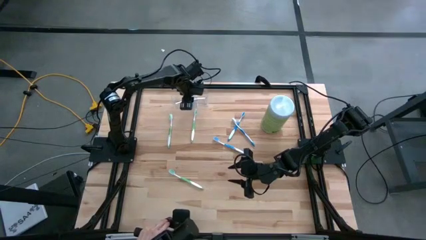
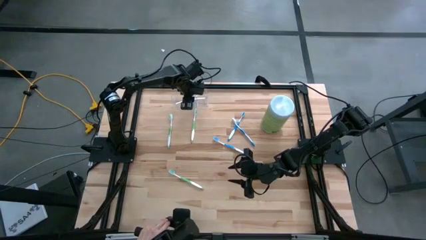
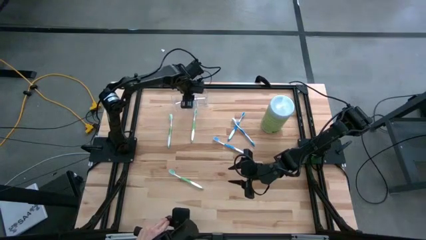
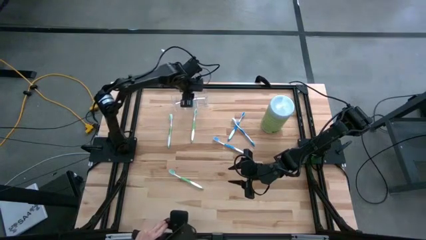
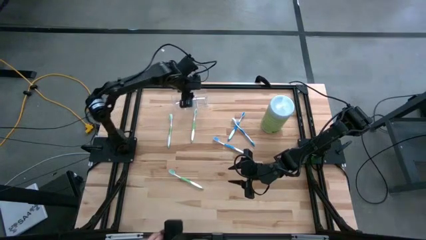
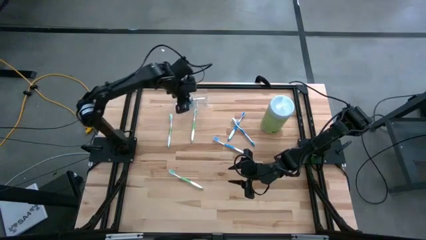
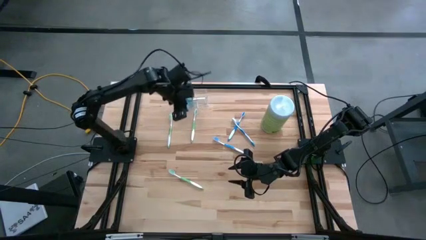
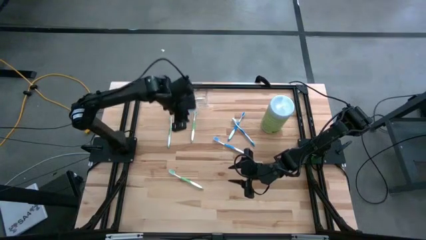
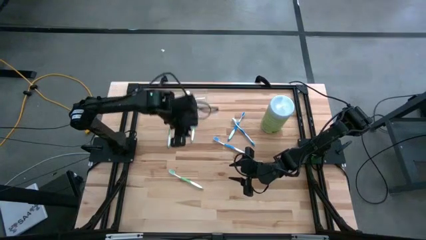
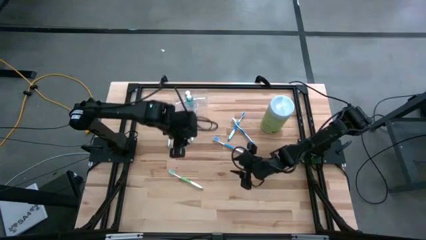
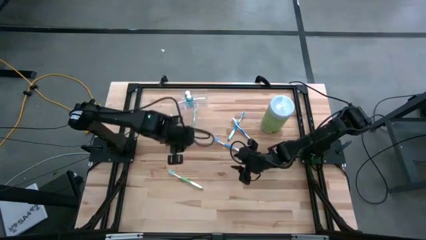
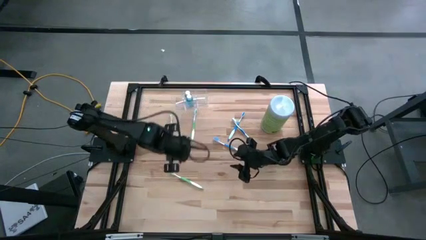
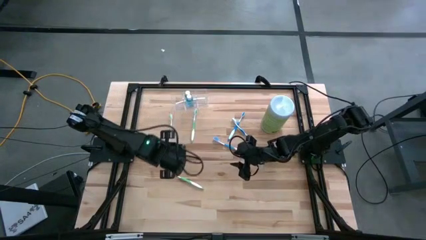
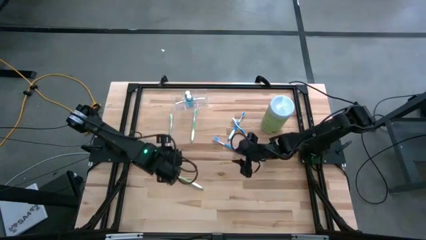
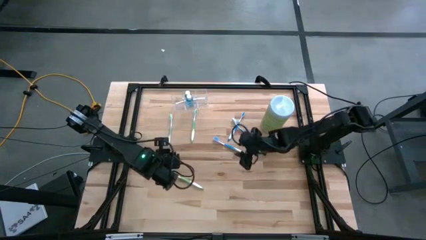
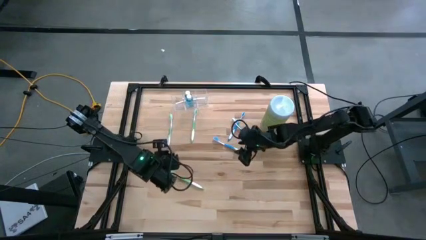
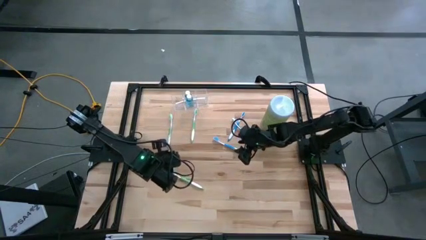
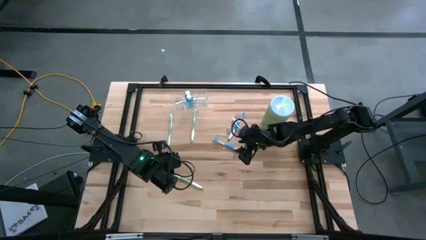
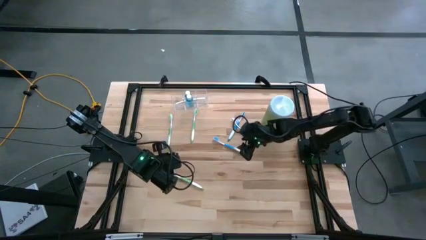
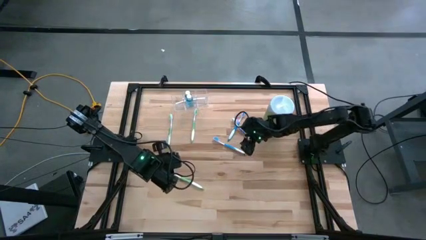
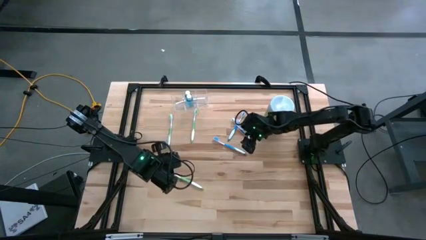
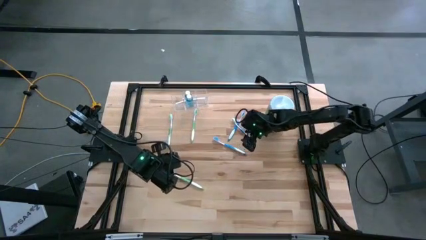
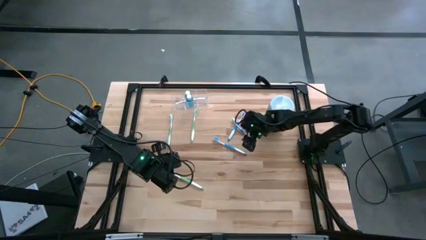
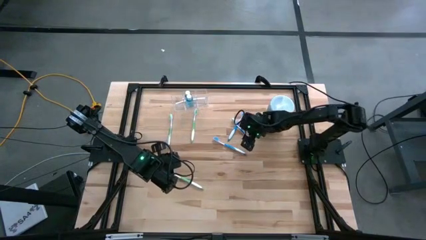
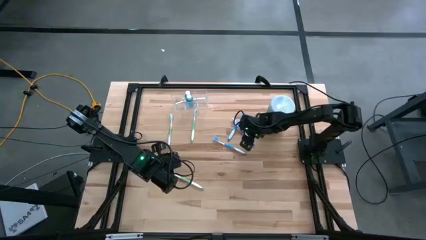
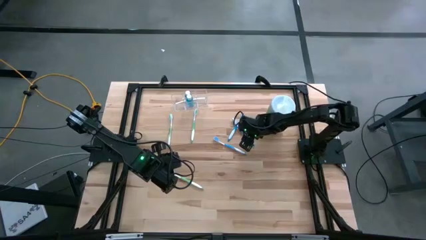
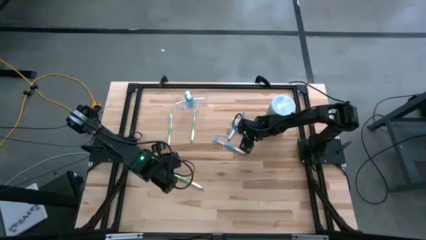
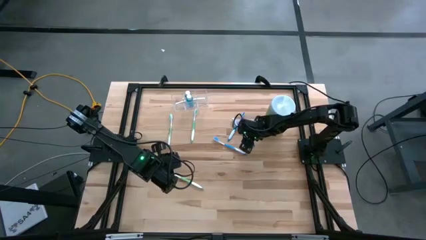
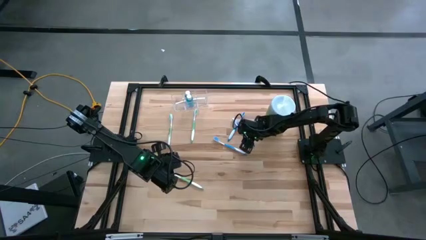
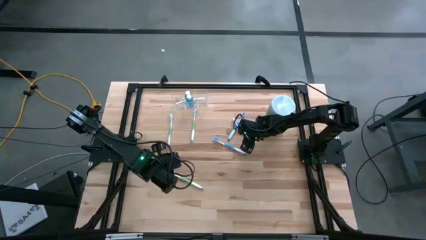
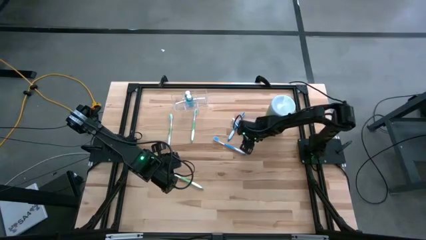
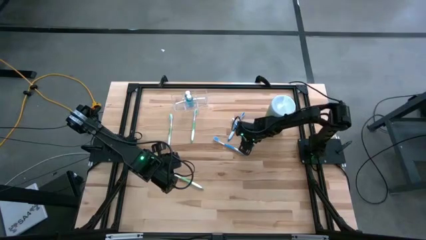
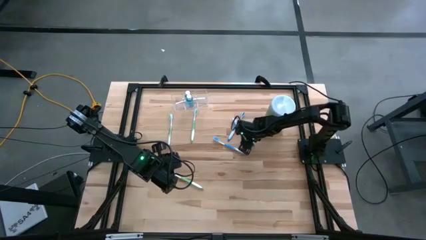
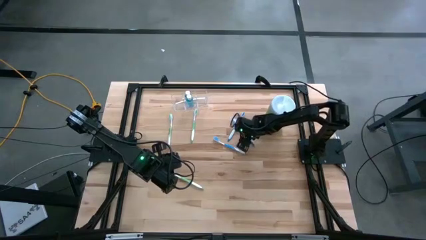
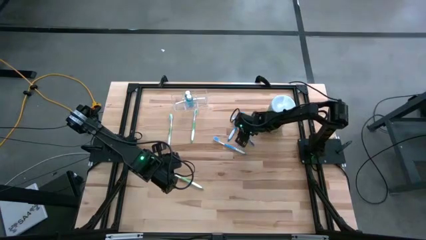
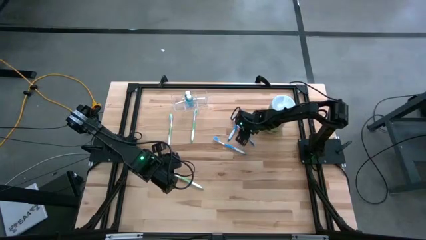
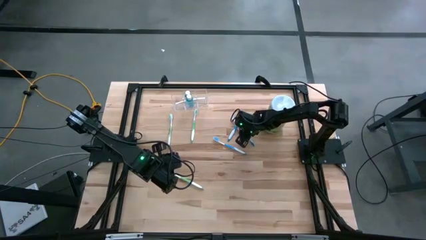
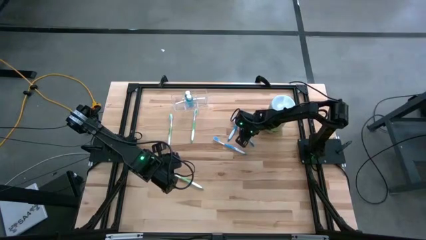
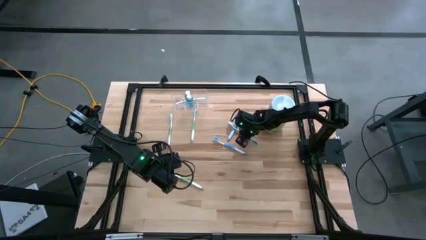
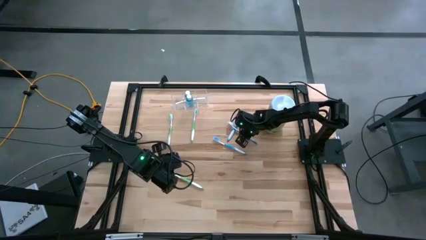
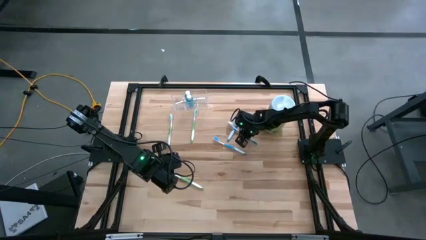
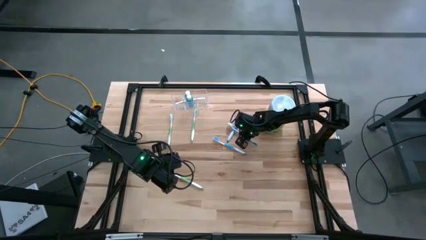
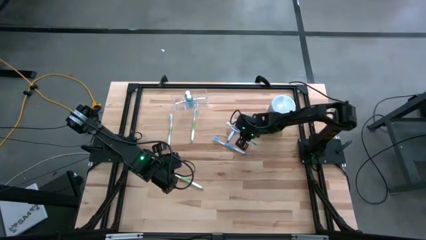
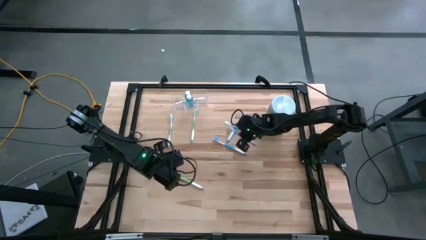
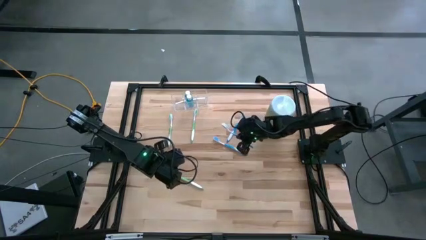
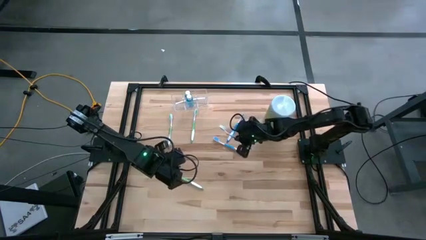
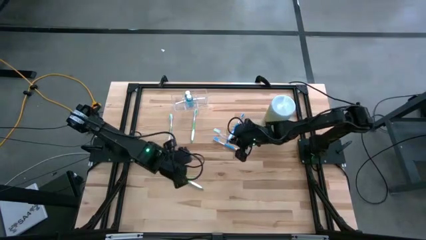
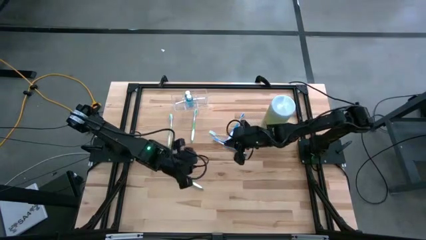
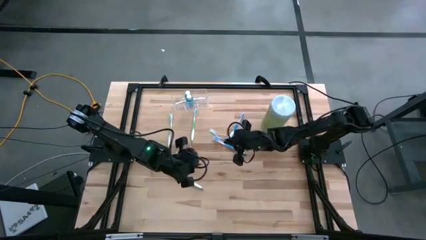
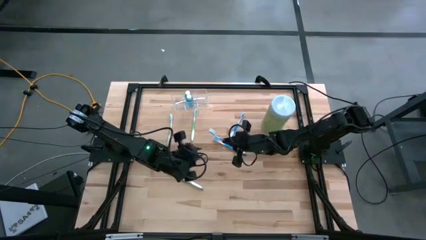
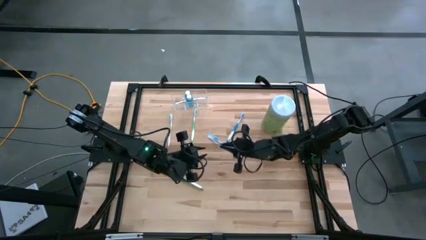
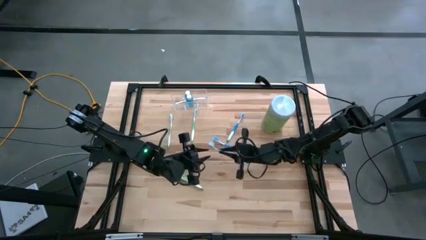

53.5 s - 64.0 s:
Task: Pick & Place toothbrushing station
Put the top right blue toothbrush into the left section of the transparent organizer
